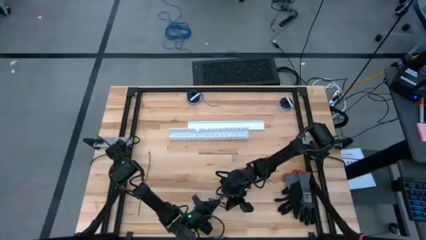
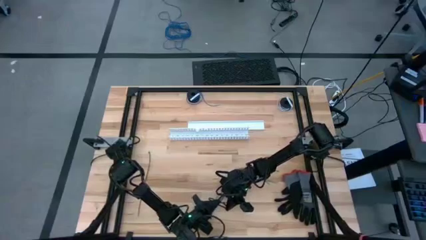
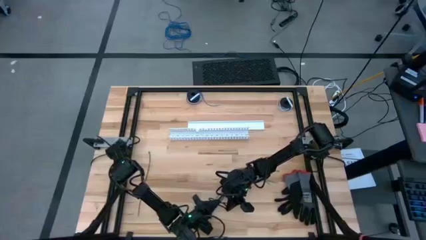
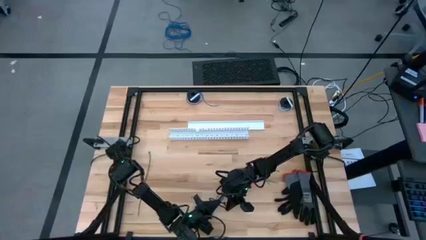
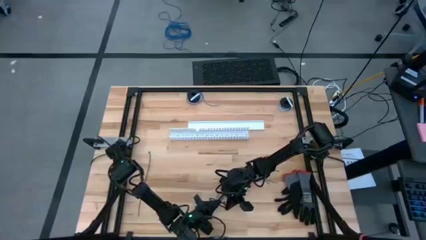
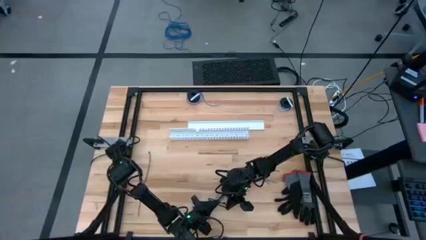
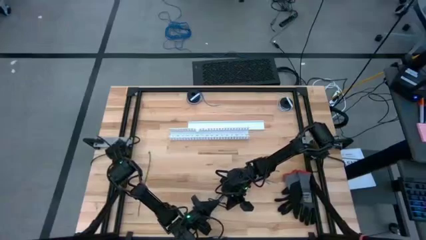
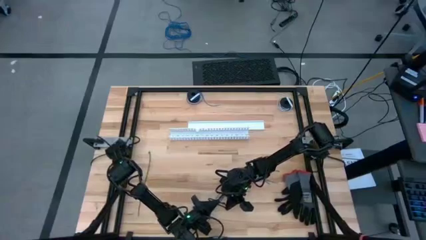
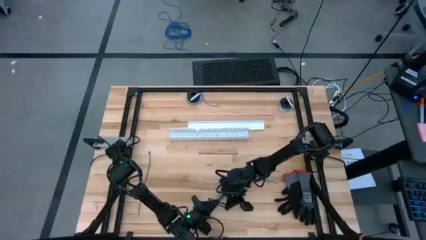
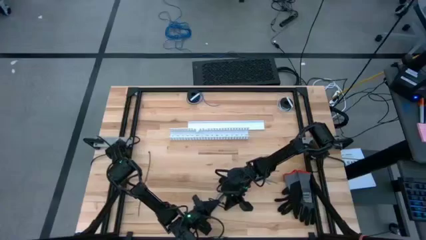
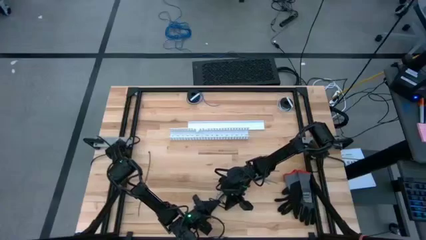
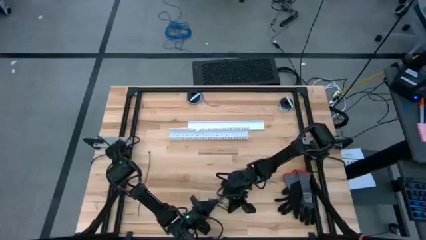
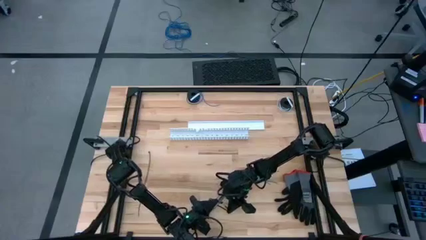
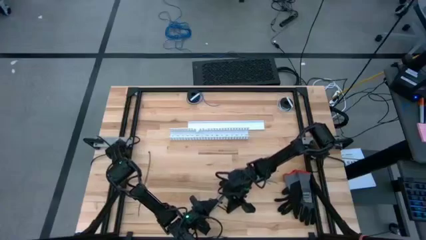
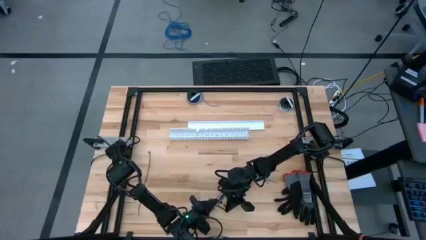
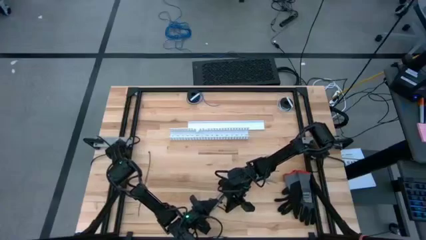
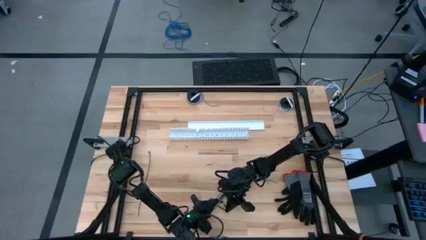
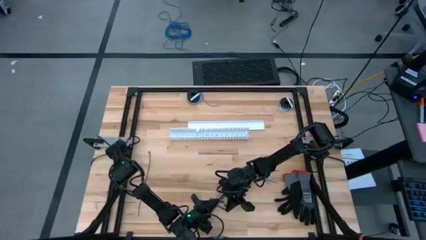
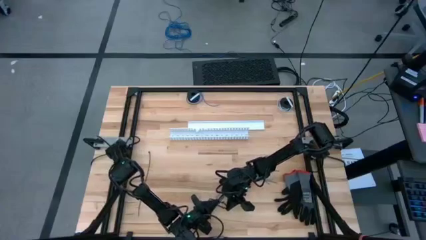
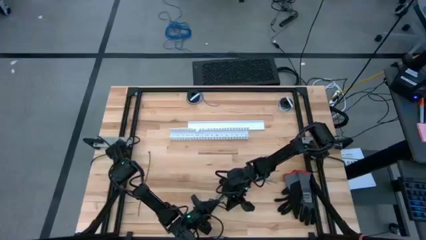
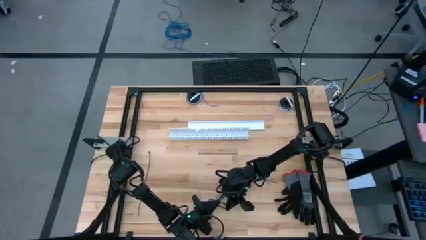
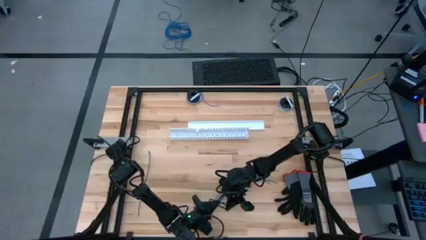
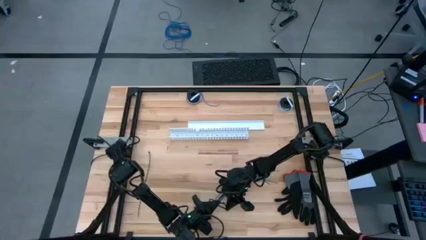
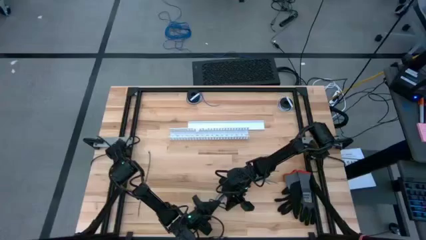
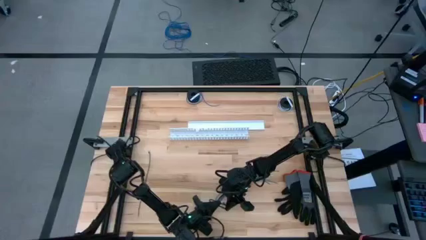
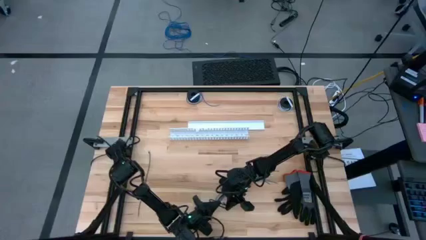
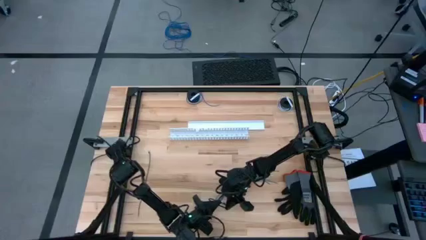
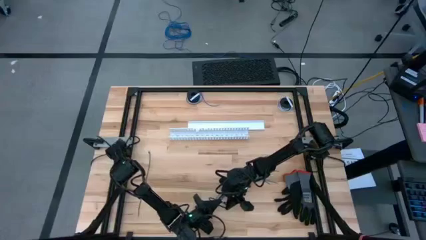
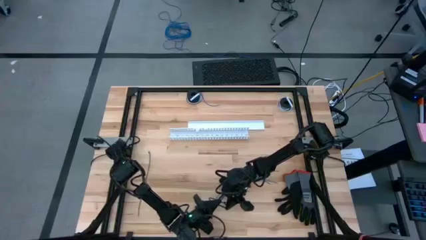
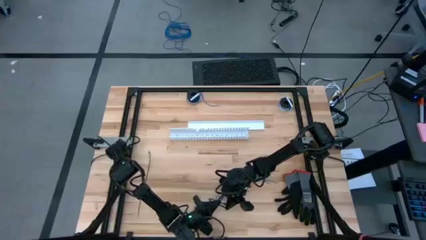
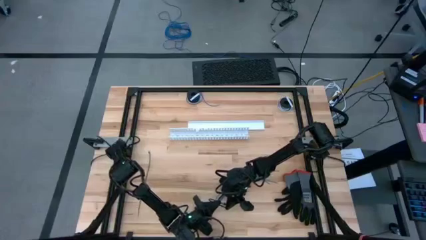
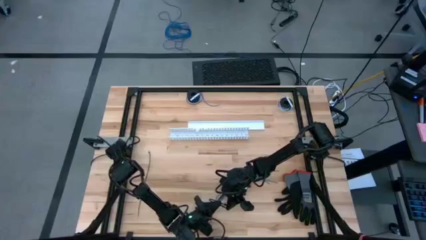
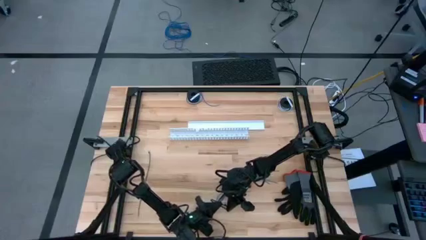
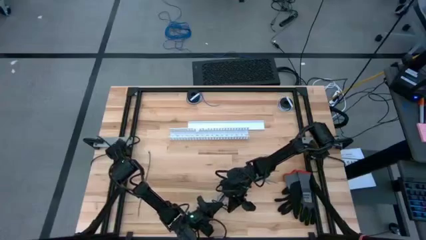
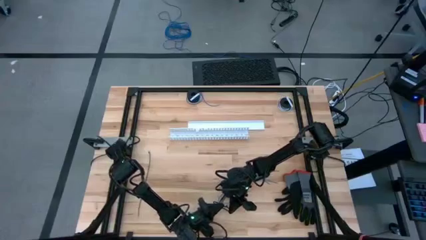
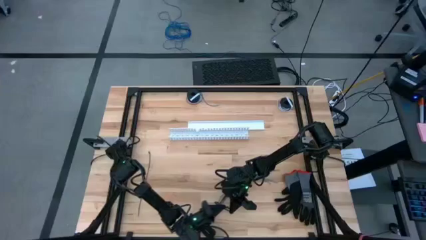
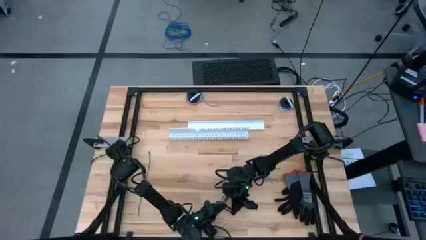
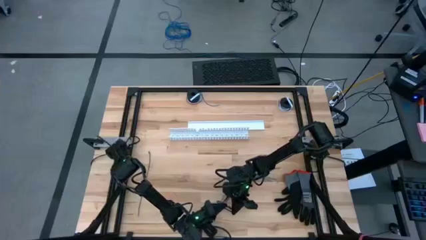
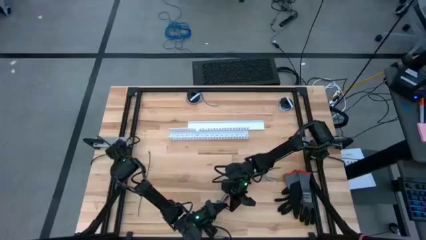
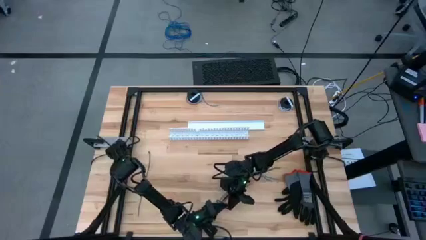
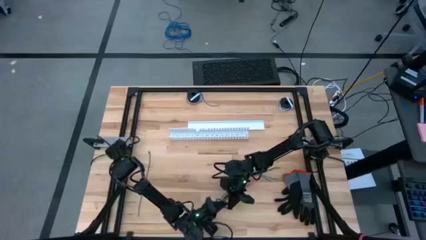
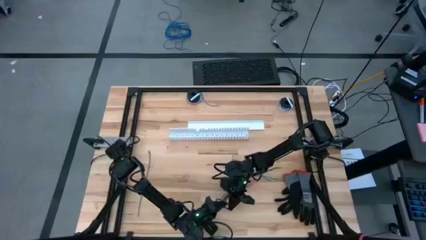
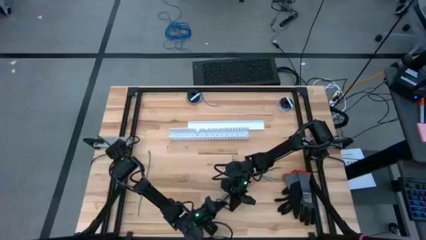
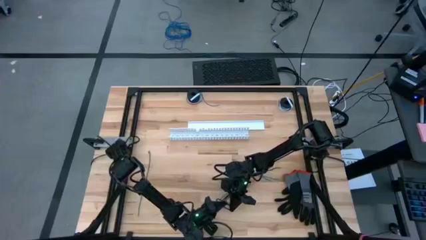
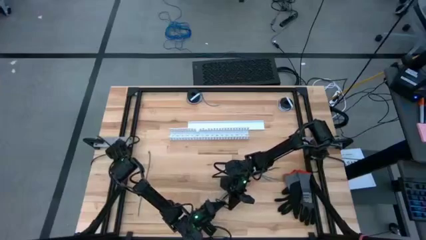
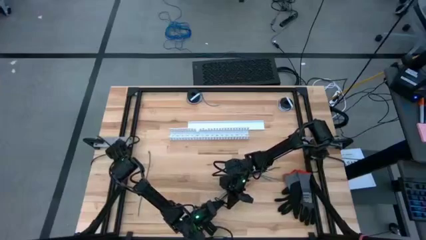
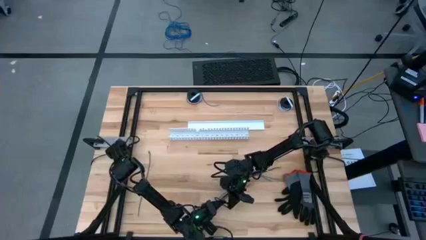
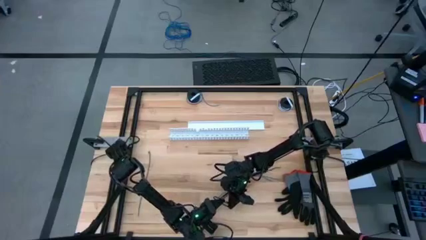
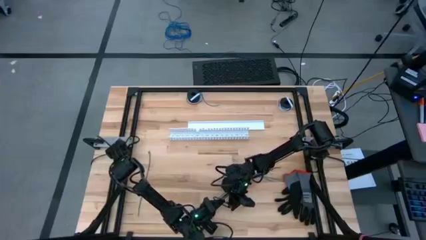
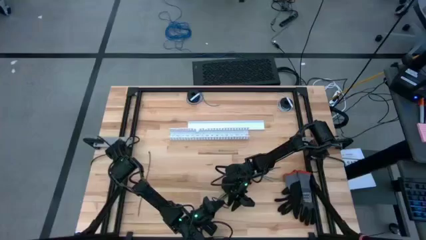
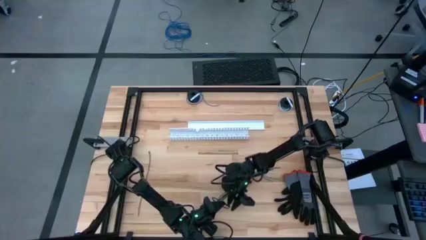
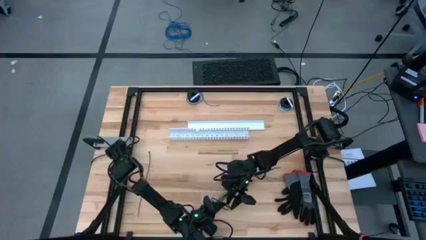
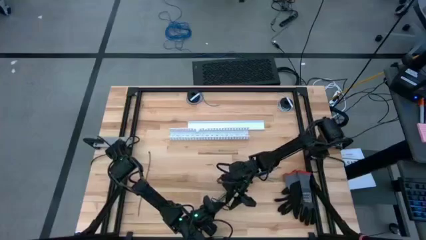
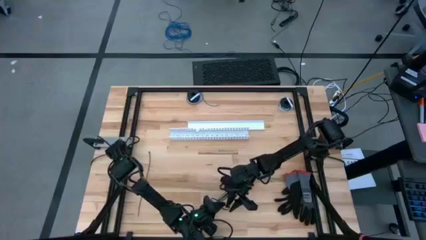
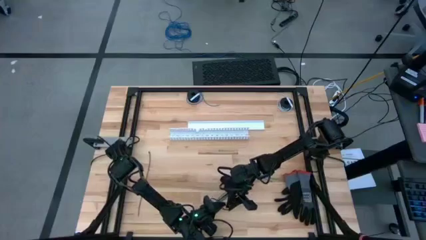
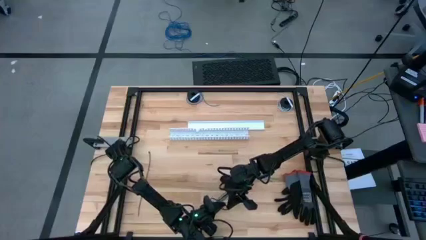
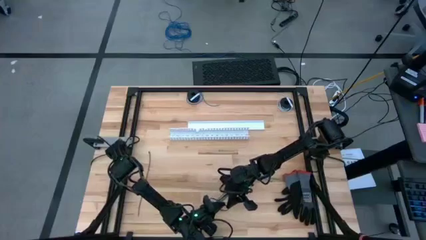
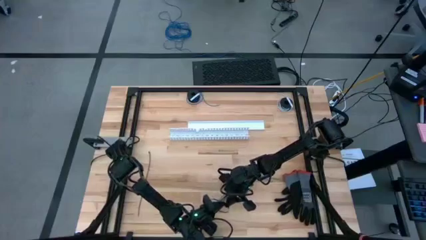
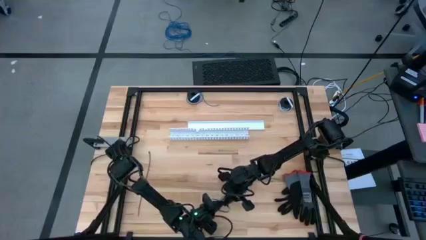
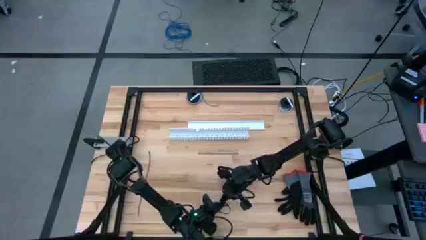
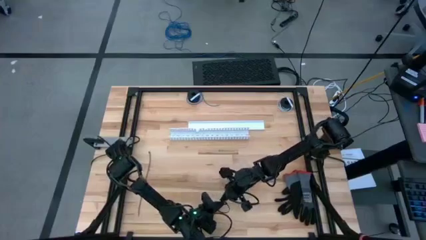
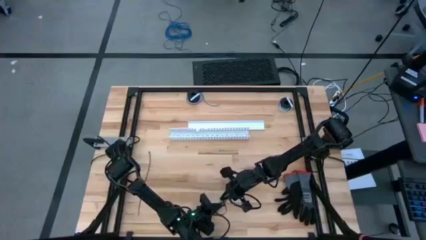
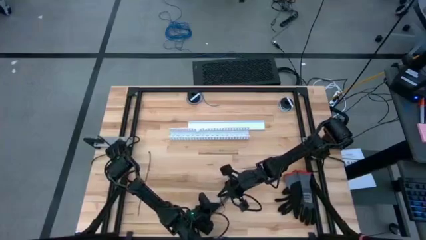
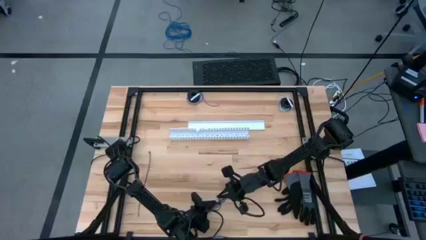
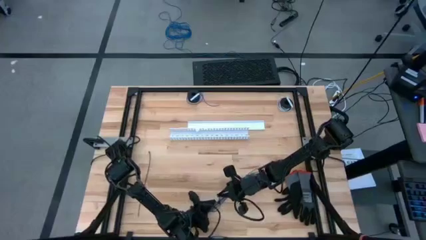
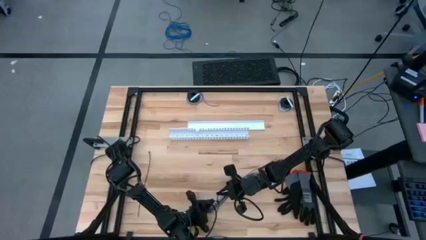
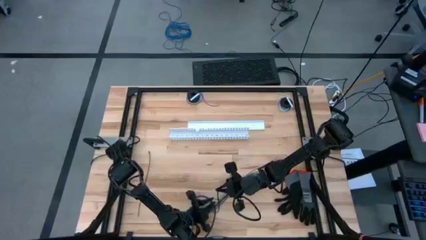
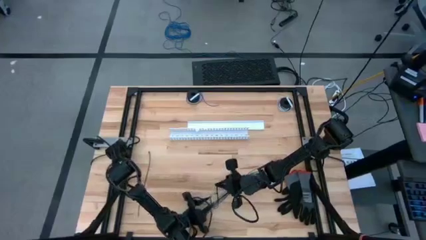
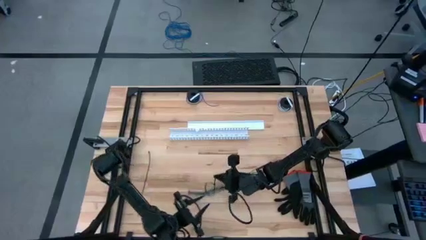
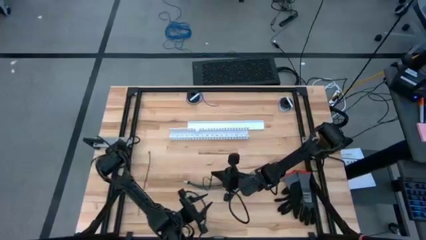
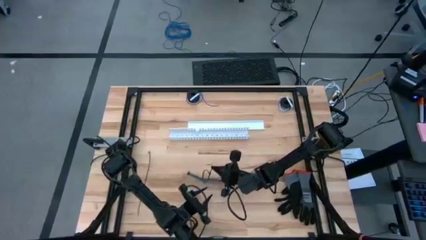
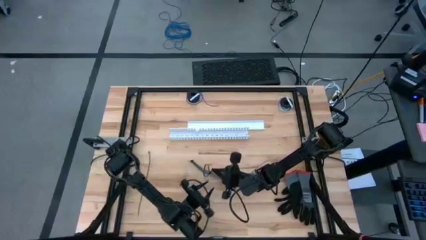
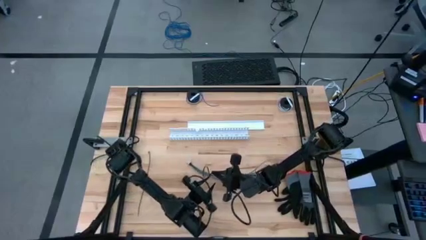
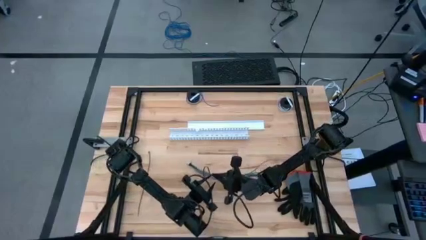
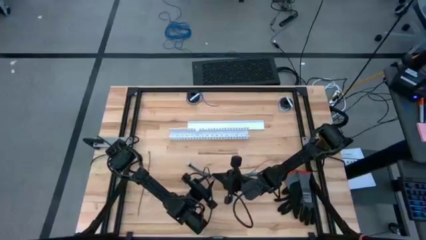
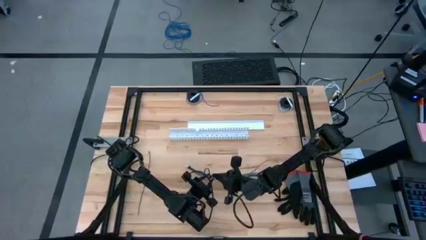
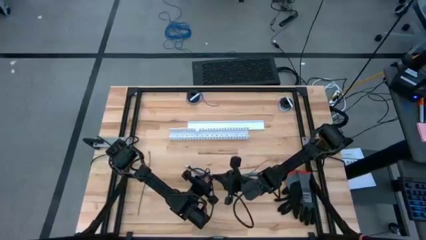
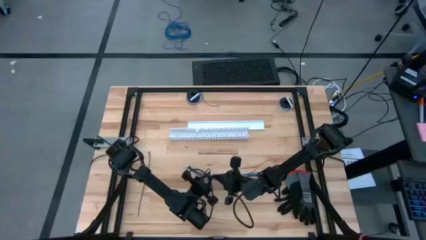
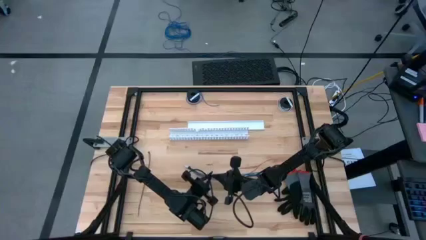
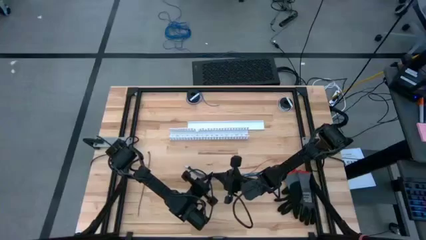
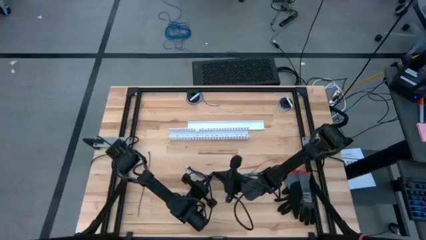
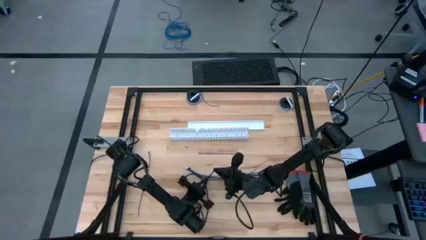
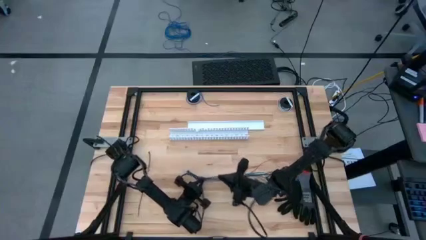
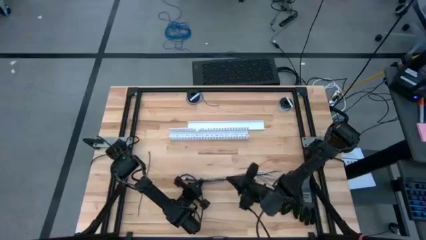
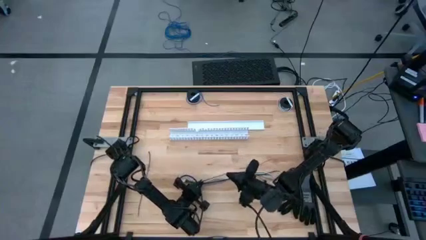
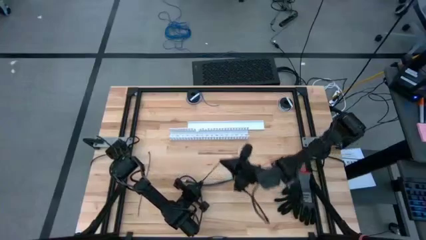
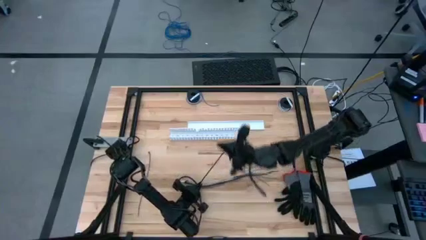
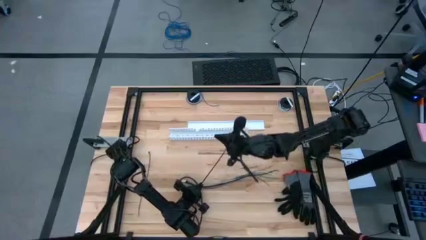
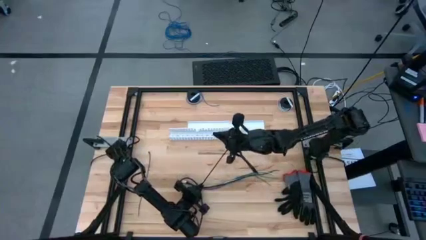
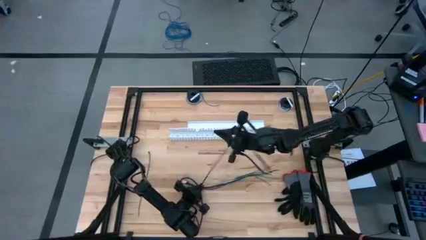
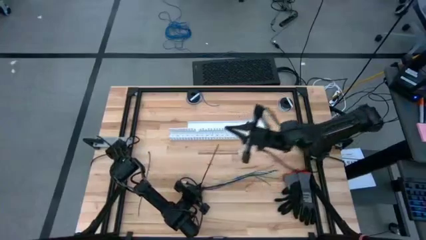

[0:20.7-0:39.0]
Task: Ziptie cables
Assemble the cable wires with the together using a zip tie
